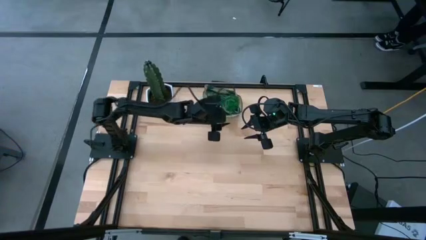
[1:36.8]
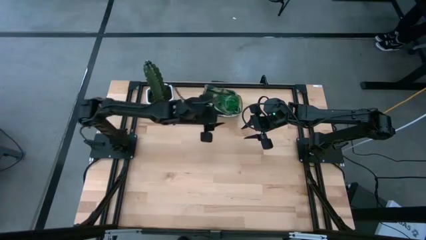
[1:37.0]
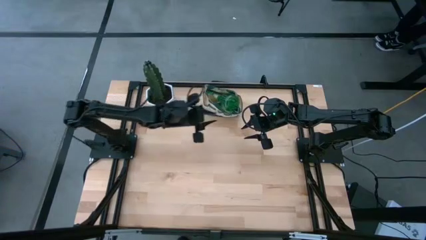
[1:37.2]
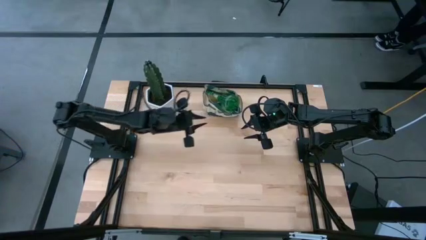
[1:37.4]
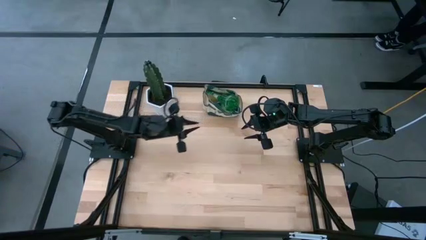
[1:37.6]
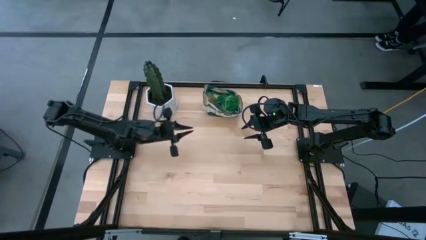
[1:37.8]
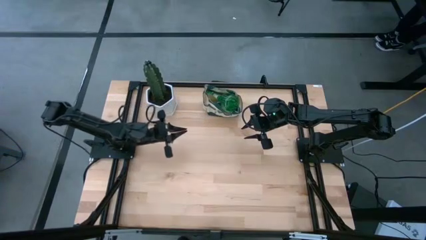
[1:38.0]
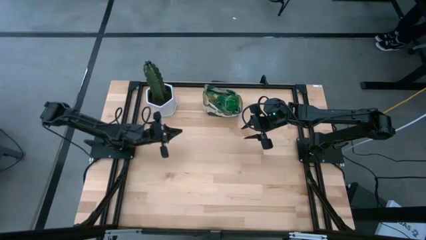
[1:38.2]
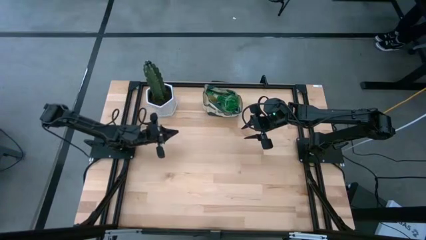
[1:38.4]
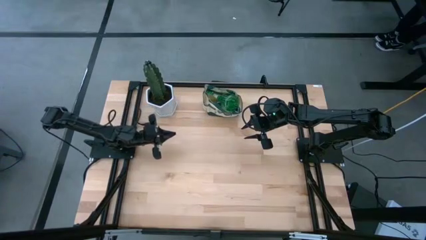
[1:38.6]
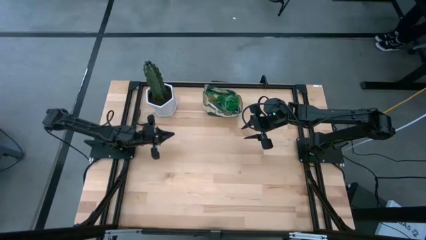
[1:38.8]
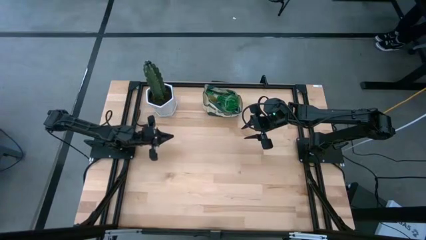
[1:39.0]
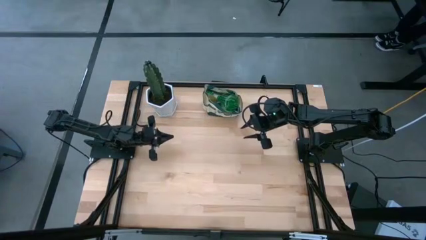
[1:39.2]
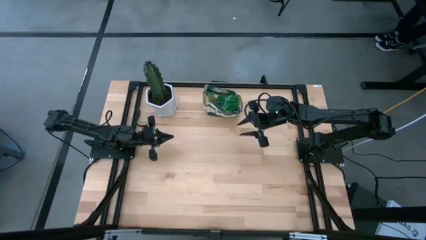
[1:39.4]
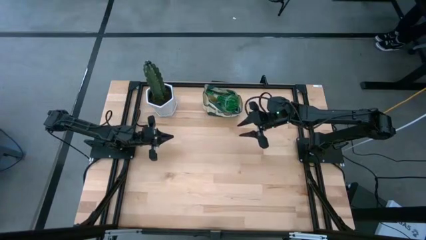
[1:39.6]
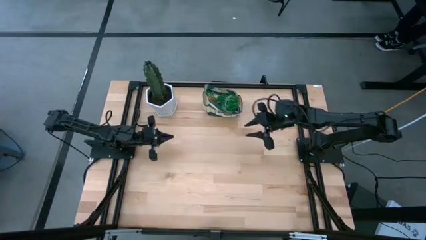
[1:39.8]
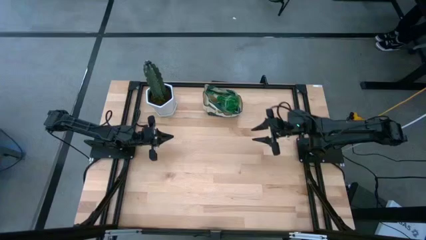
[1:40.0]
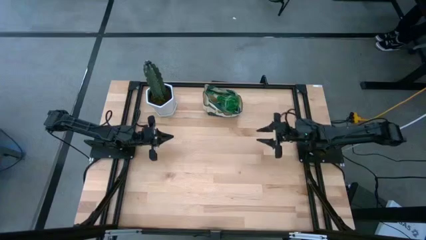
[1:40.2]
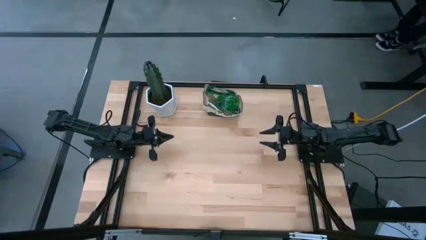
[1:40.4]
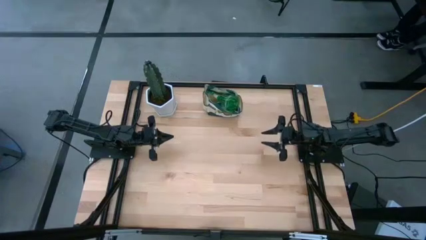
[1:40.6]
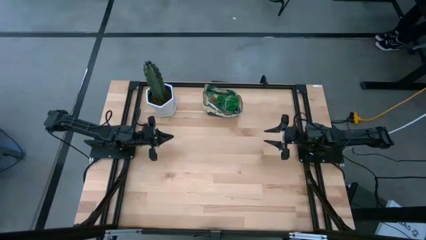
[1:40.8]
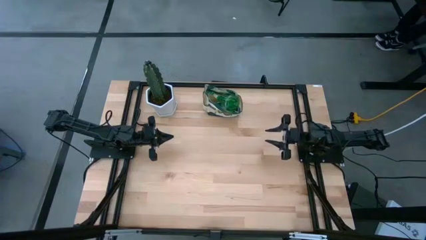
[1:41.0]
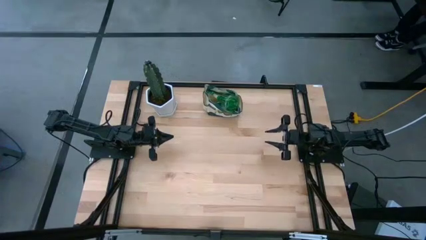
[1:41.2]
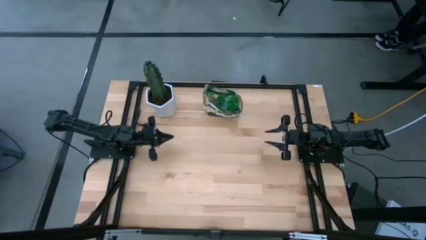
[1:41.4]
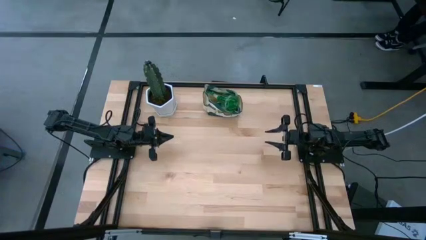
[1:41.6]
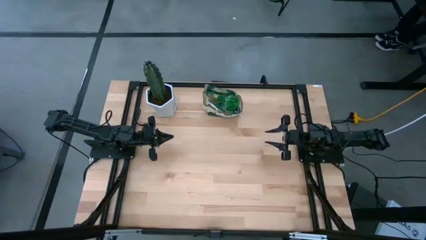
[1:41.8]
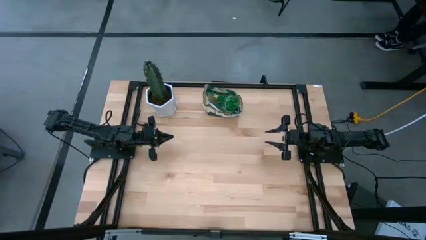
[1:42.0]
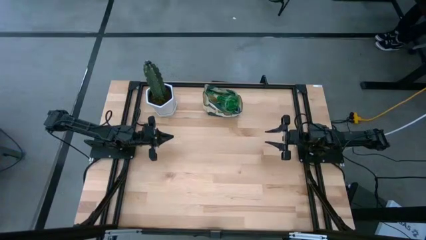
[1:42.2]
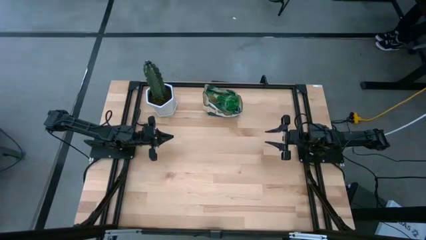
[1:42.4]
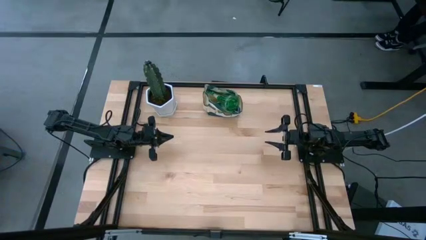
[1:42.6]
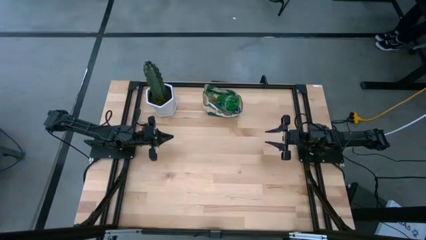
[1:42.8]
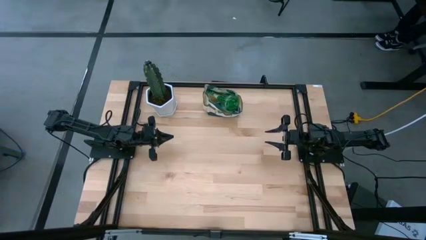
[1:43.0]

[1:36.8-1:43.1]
Task: Pick & Place Garden tools in Gardening bag
Return to Home Position

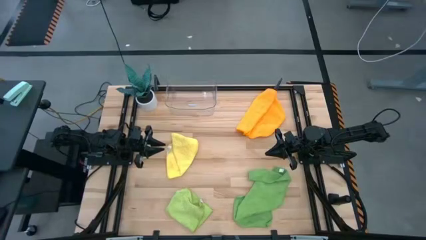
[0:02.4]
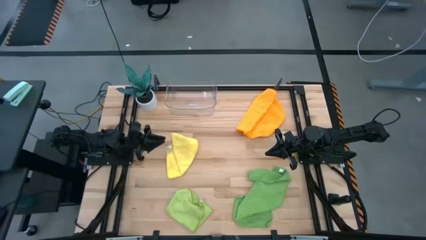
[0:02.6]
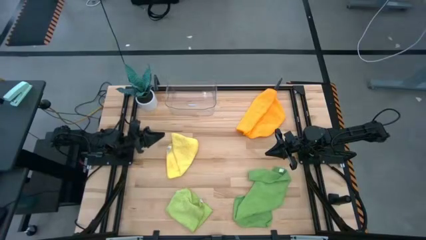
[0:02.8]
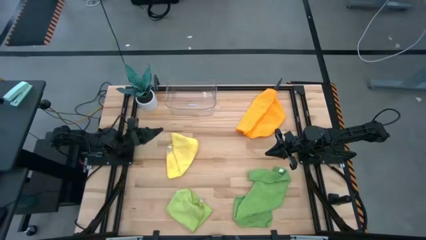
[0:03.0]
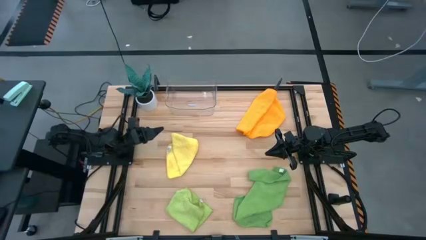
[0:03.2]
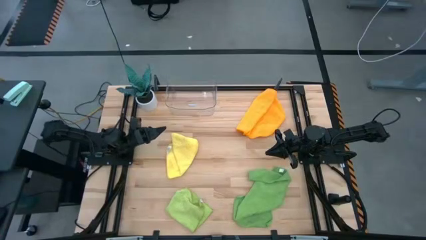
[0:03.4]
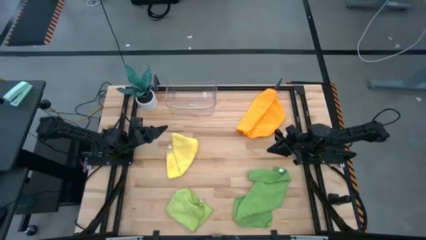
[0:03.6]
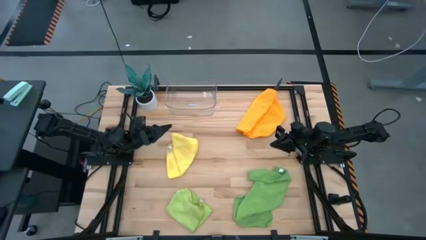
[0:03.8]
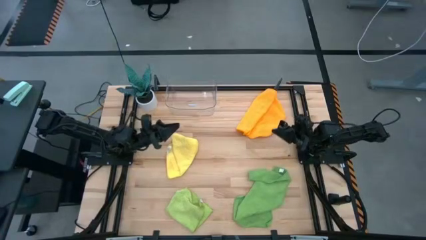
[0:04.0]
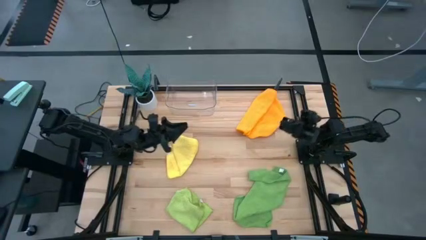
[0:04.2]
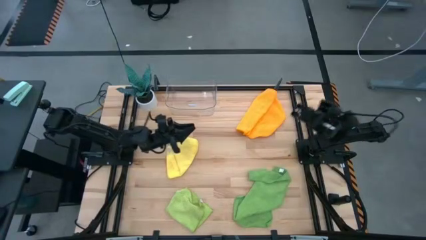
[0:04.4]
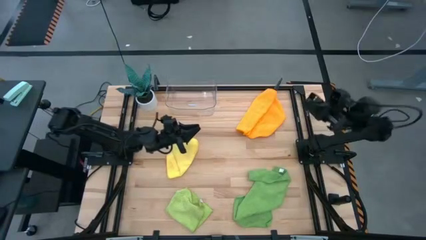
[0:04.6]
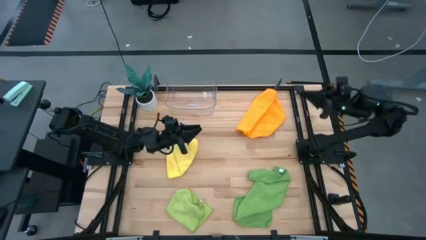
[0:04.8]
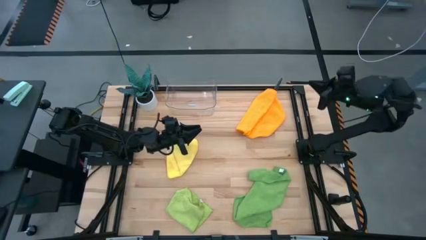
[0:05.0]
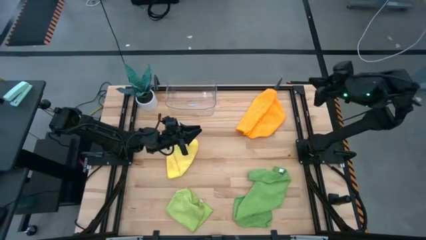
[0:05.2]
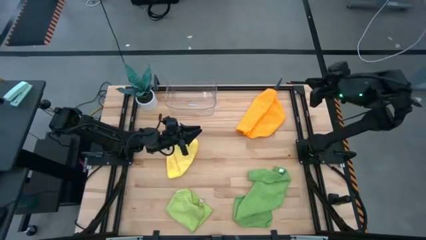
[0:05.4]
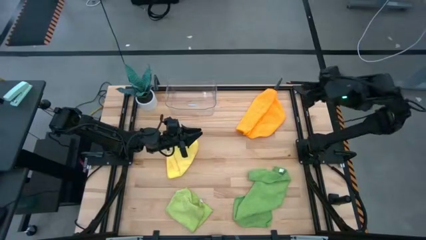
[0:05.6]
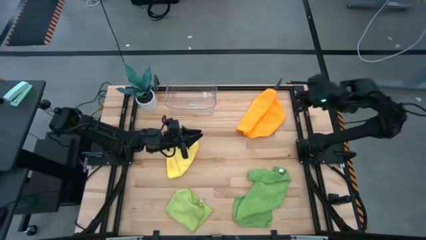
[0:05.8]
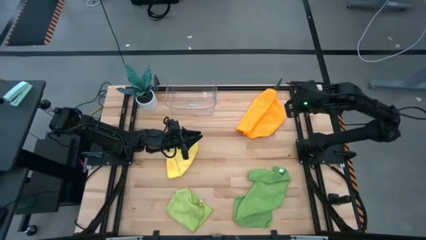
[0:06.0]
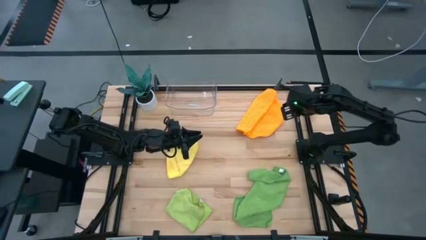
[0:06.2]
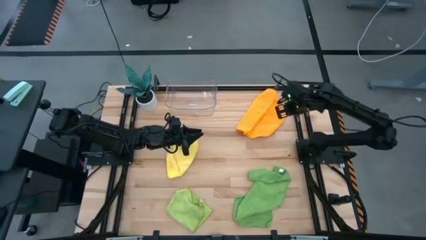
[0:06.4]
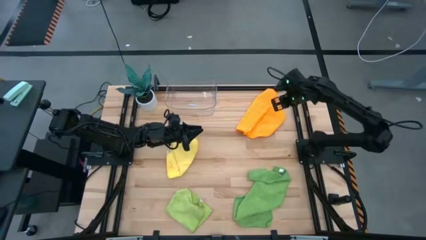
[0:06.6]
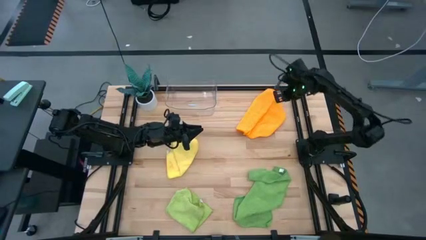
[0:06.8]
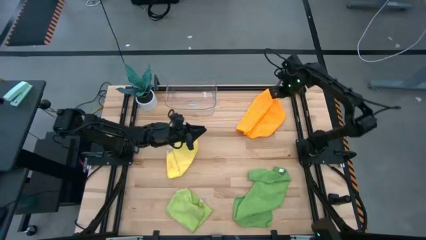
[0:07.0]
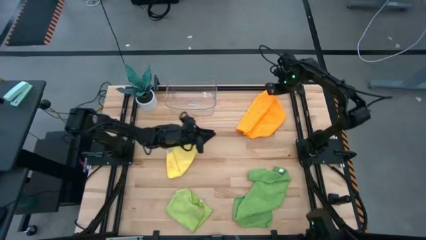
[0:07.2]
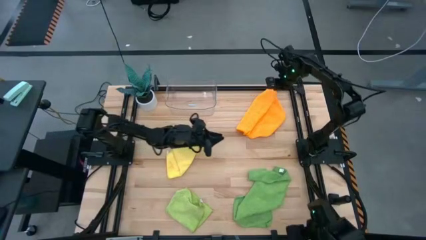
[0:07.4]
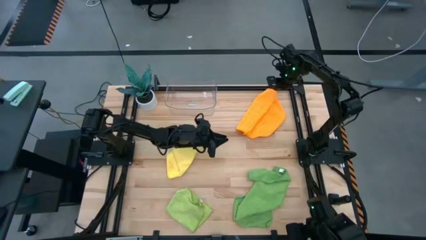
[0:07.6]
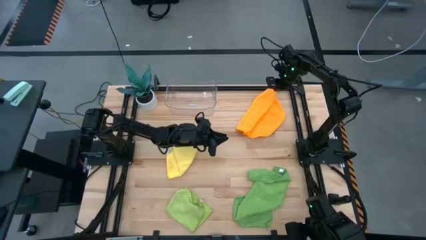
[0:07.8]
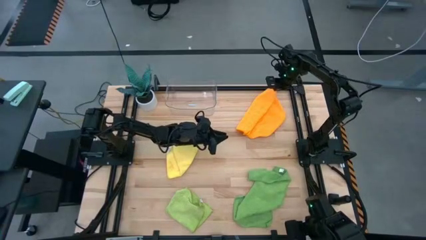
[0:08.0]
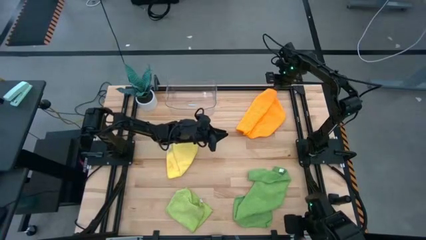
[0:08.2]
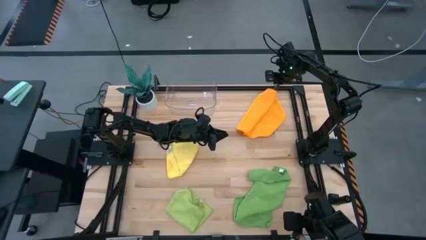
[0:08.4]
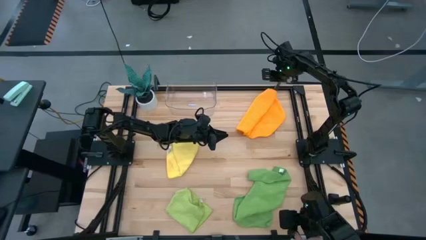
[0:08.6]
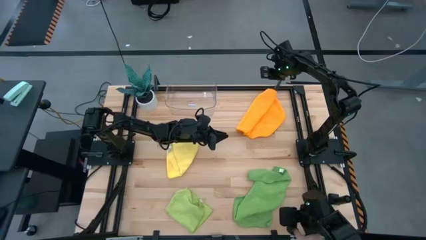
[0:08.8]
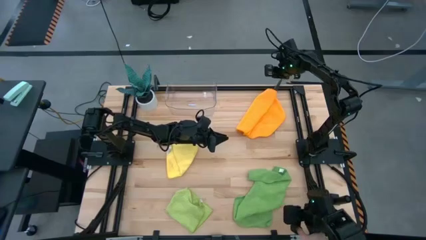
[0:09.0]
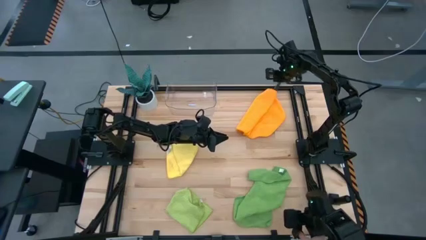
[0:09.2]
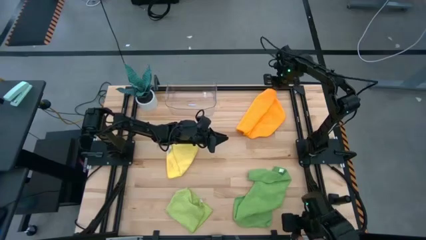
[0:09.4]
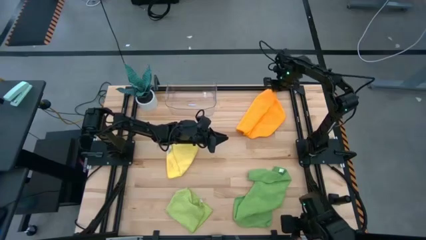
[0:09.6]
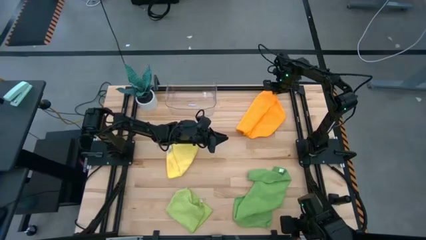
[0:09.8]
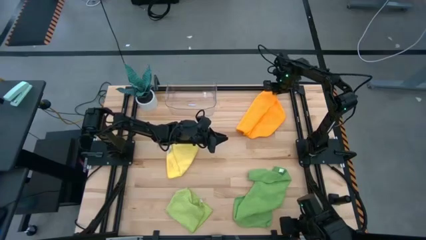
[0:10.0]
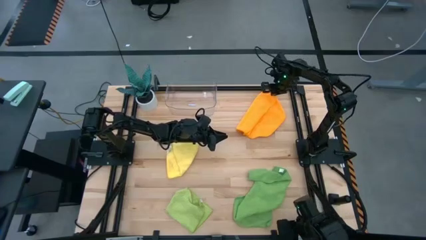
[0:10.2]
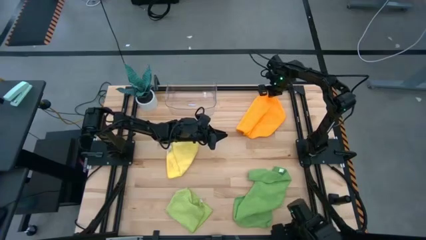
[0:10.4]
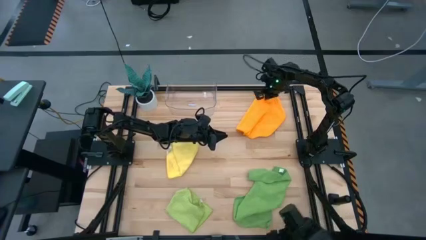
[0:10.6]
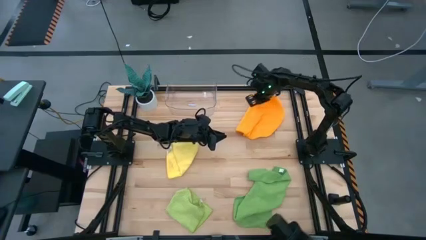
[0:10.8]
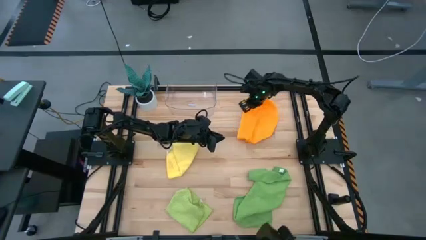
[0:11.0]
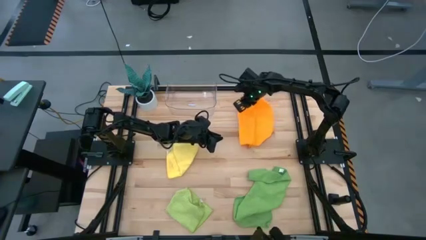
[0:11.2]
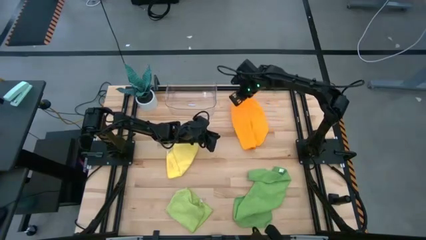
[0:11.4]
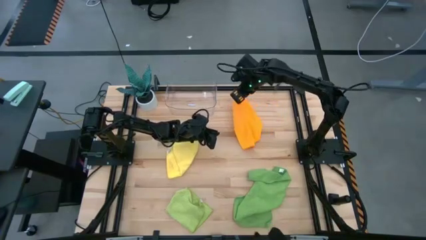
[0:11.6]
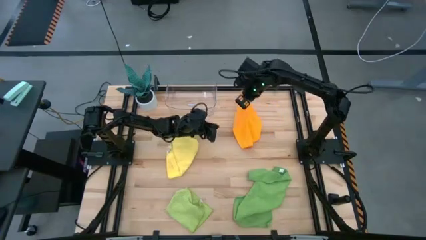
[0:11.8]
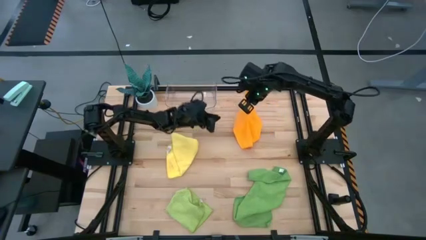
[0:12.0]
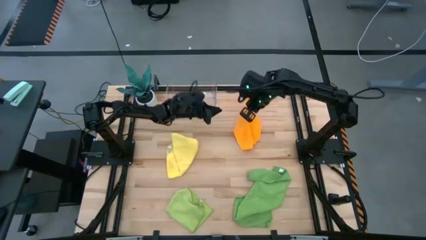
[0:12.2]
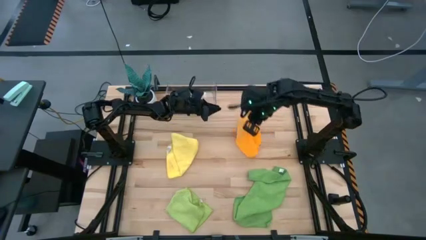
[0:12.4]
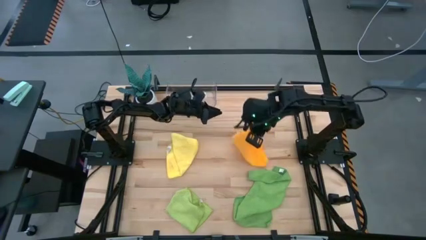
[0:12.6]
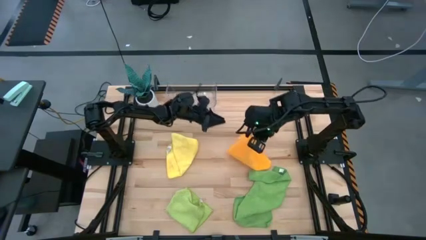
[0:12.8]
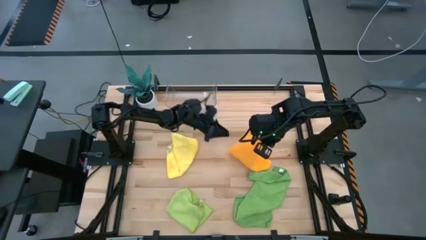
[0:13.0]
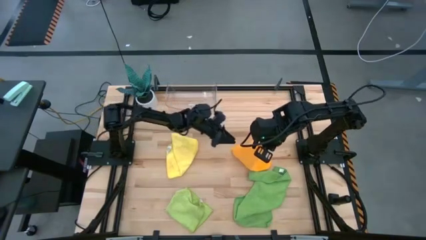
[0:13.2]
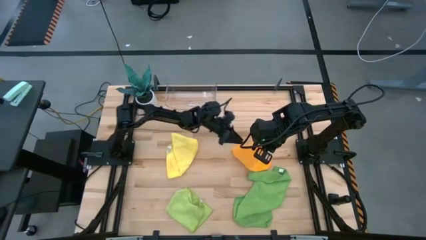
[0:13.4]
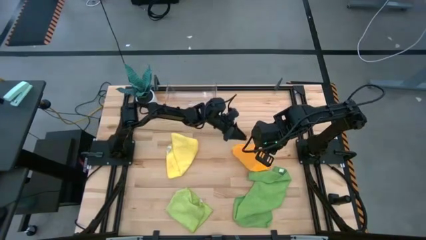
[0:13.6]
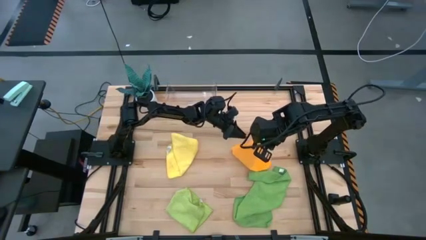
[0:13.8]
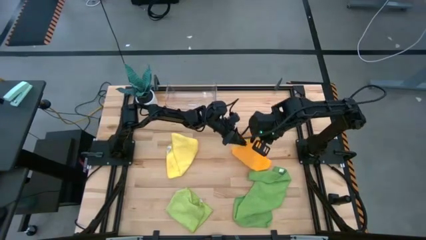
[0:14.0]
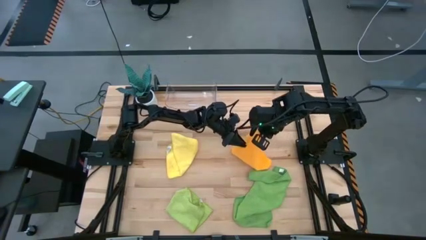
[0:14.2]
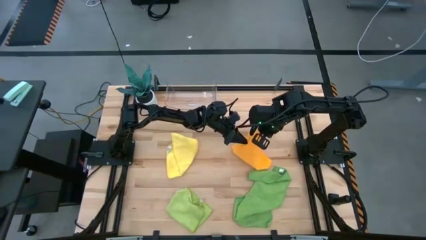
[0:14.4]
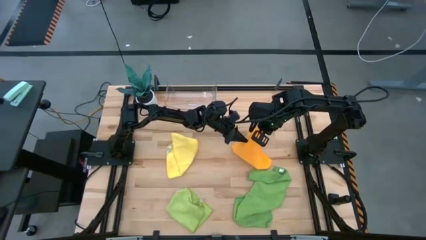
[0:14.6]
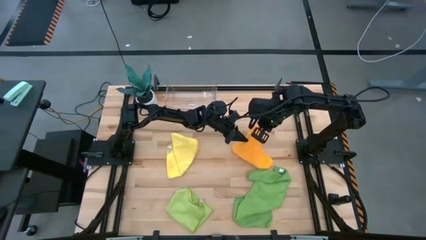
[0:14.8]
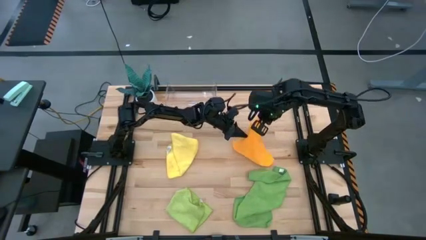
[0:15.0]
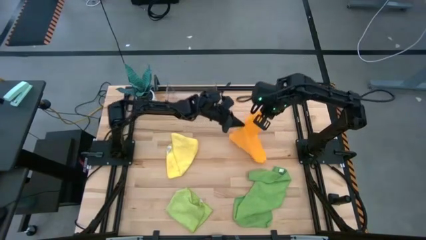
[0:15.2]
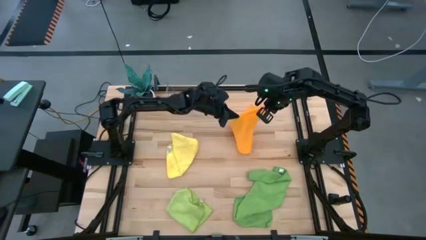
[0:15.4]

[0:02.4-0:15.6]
Task: Fold microfiber towels
Fold the orange towel
